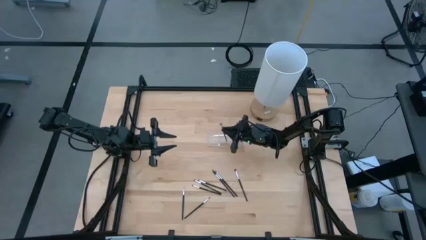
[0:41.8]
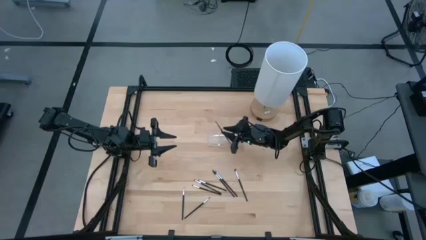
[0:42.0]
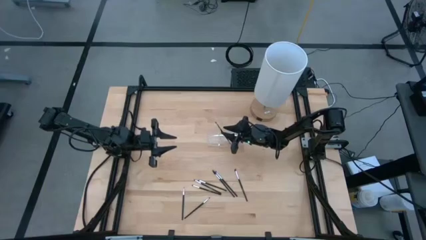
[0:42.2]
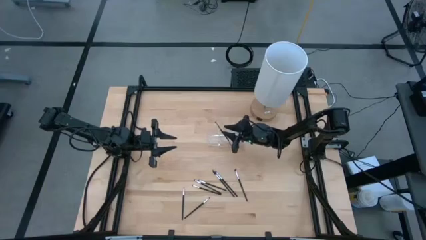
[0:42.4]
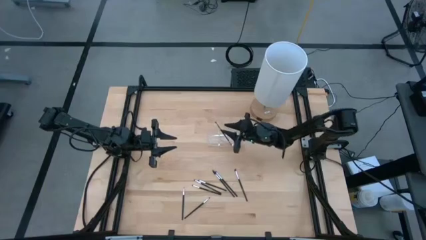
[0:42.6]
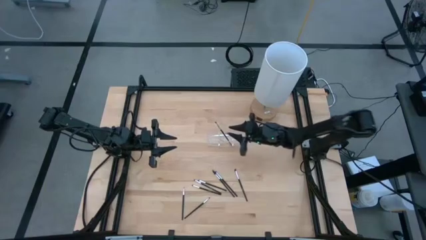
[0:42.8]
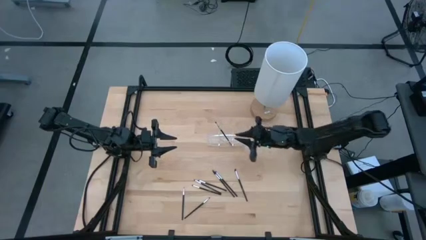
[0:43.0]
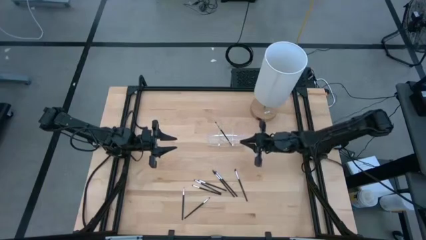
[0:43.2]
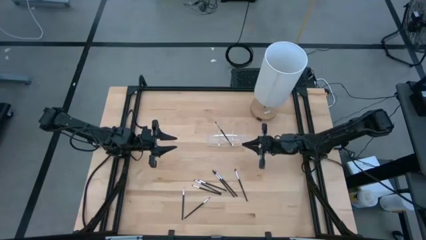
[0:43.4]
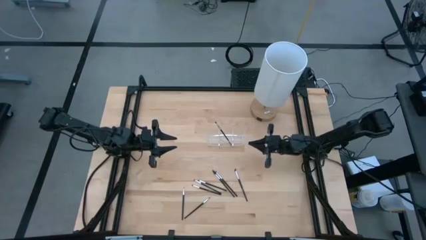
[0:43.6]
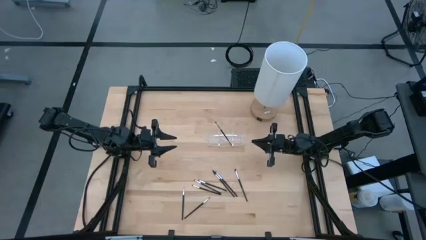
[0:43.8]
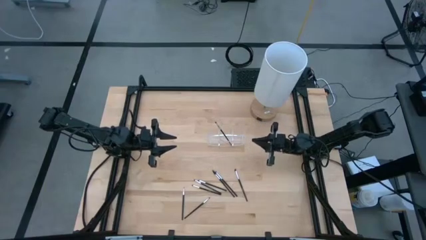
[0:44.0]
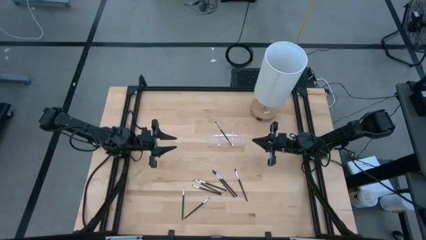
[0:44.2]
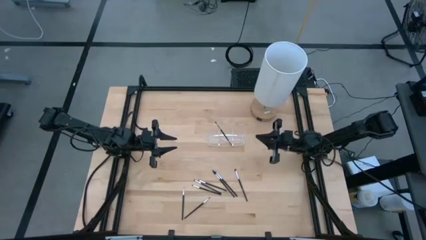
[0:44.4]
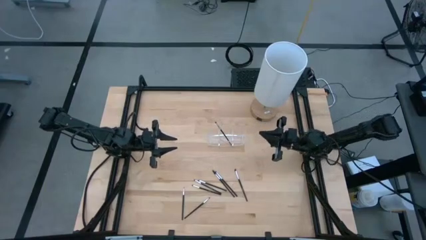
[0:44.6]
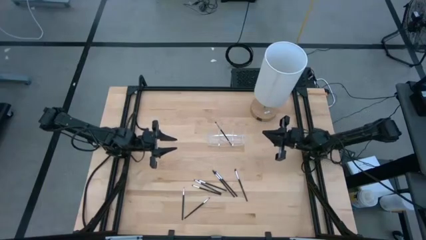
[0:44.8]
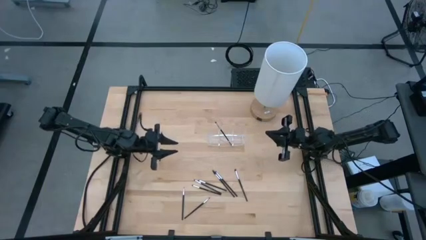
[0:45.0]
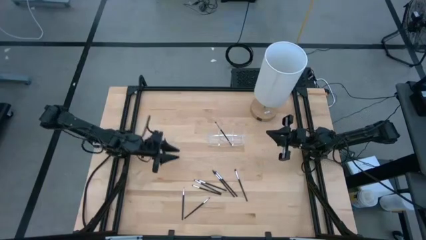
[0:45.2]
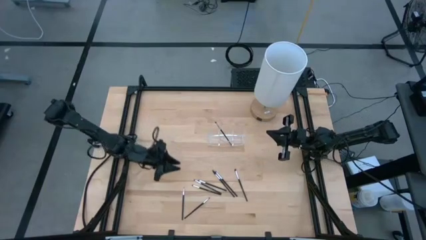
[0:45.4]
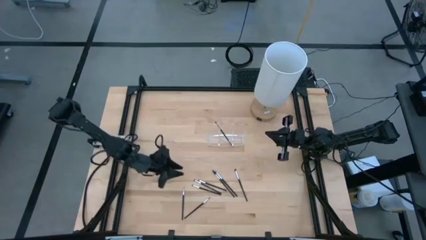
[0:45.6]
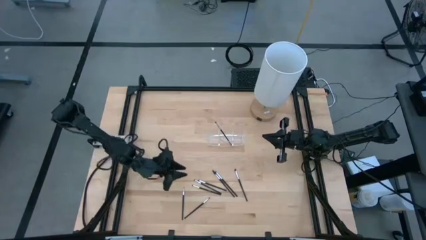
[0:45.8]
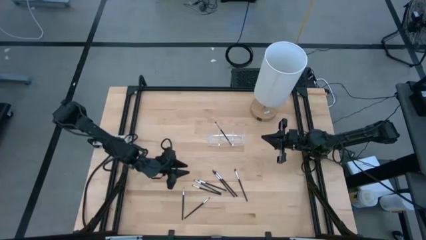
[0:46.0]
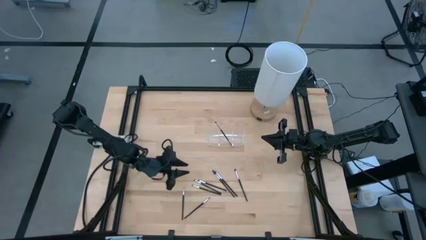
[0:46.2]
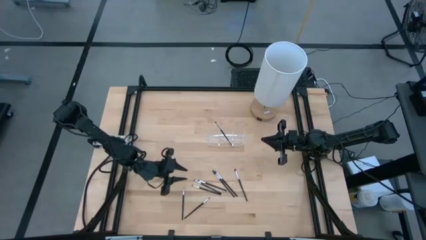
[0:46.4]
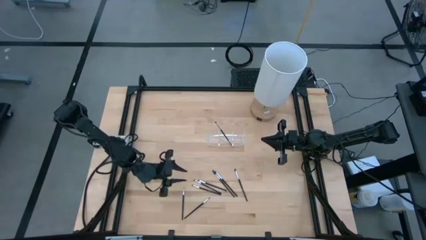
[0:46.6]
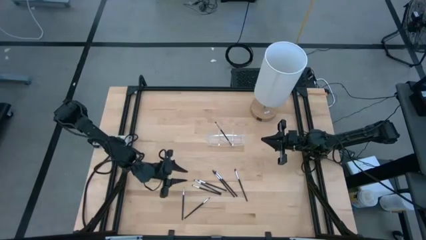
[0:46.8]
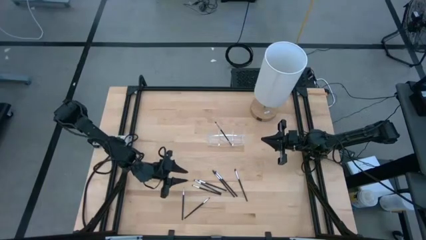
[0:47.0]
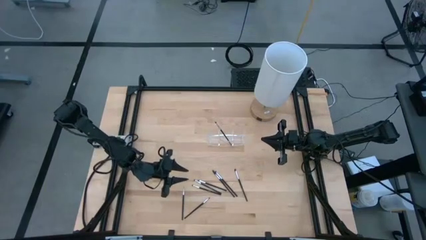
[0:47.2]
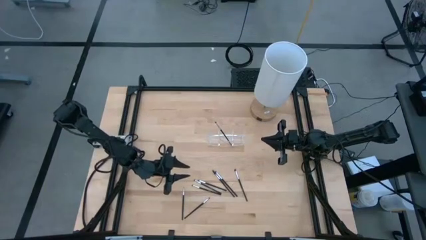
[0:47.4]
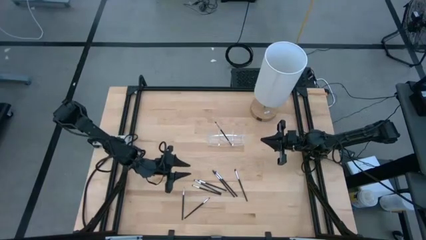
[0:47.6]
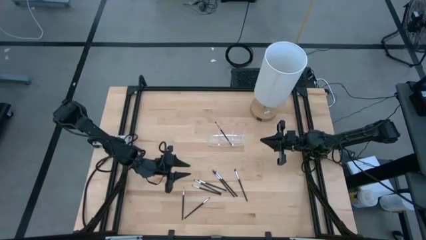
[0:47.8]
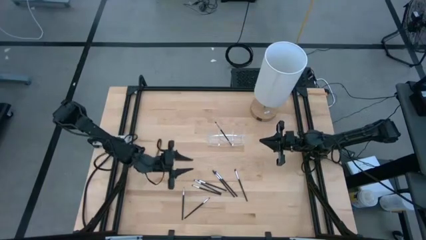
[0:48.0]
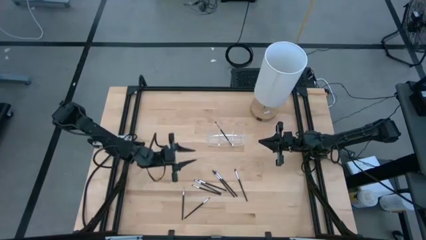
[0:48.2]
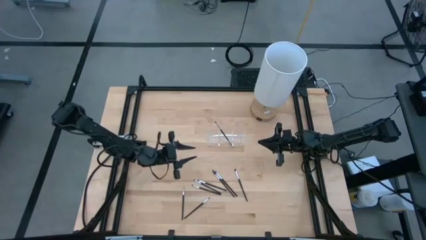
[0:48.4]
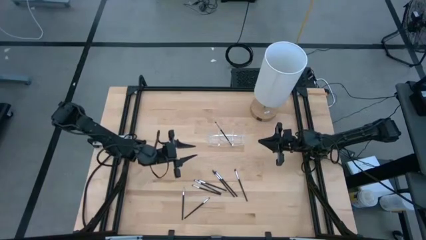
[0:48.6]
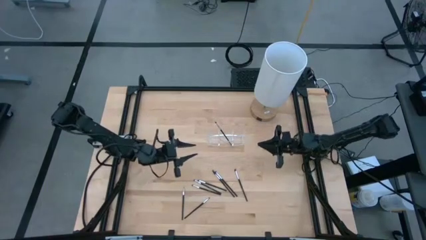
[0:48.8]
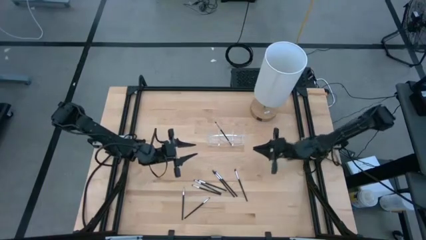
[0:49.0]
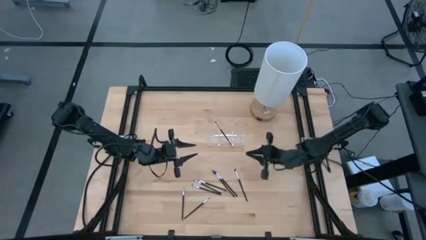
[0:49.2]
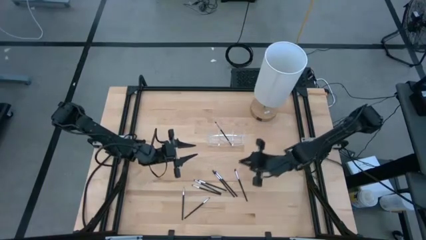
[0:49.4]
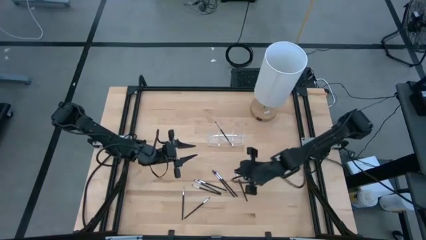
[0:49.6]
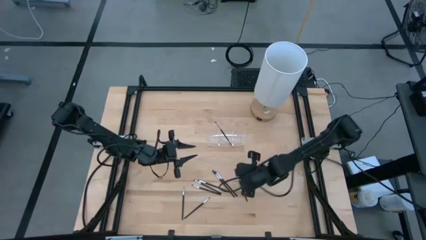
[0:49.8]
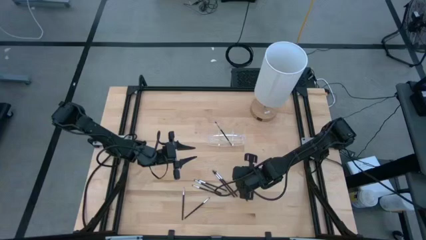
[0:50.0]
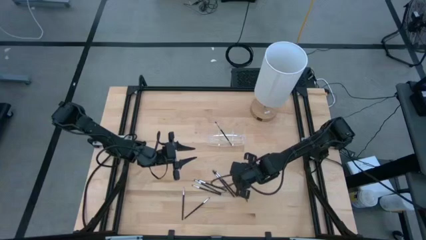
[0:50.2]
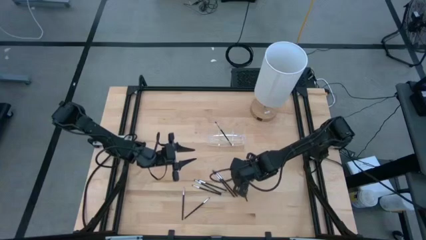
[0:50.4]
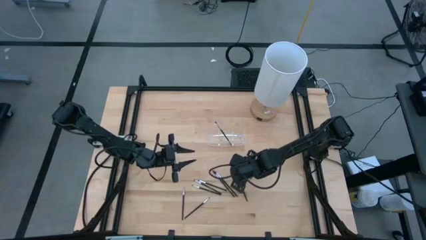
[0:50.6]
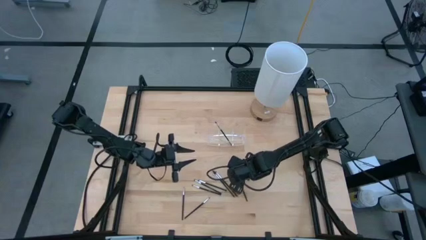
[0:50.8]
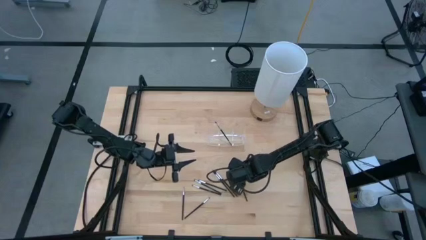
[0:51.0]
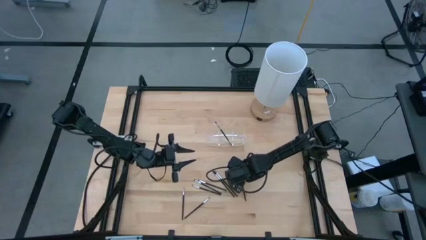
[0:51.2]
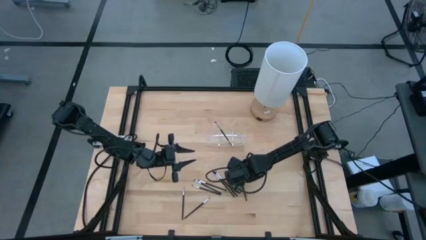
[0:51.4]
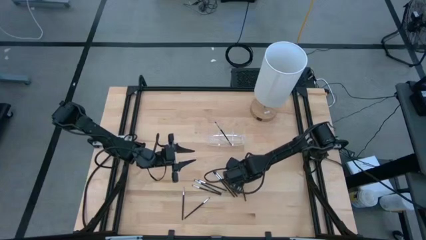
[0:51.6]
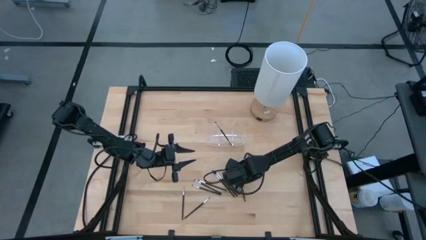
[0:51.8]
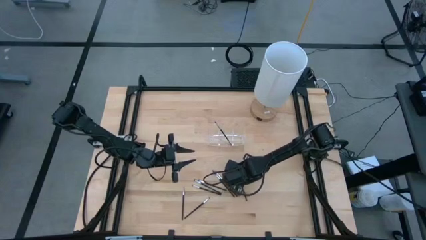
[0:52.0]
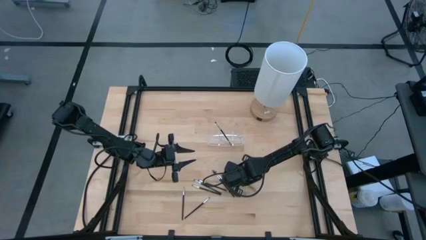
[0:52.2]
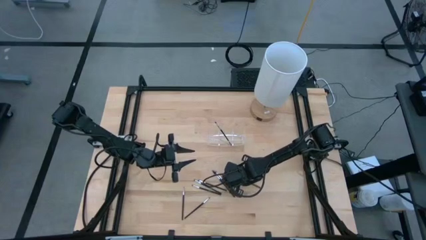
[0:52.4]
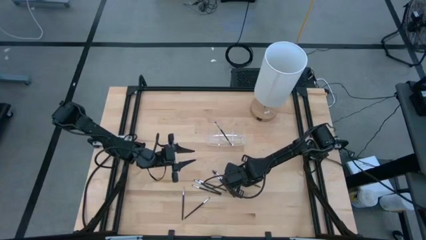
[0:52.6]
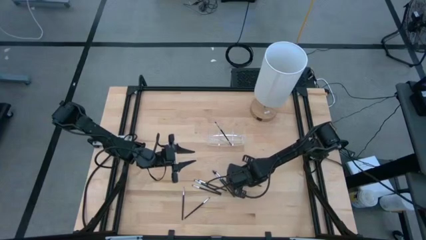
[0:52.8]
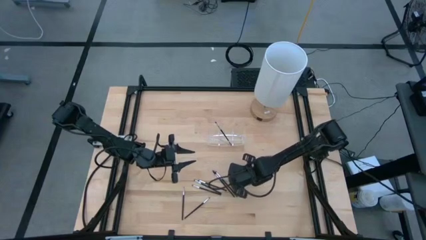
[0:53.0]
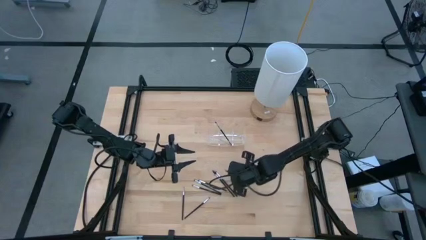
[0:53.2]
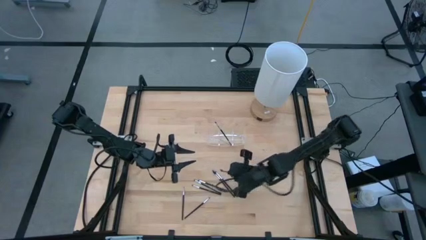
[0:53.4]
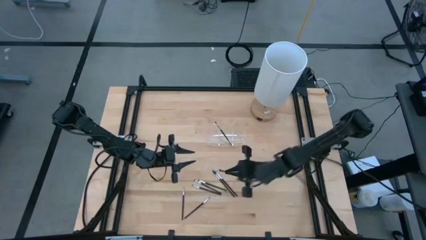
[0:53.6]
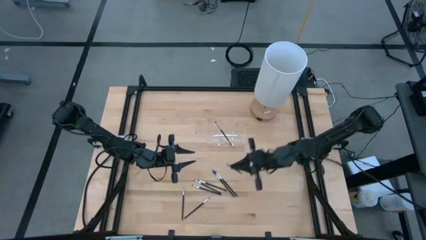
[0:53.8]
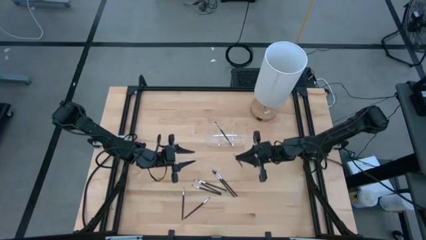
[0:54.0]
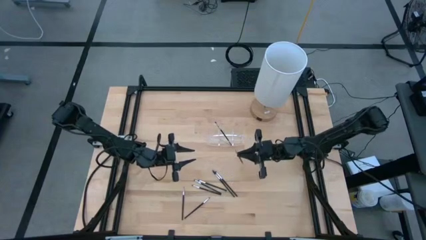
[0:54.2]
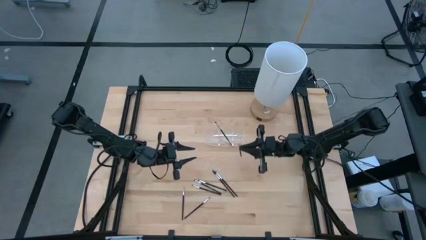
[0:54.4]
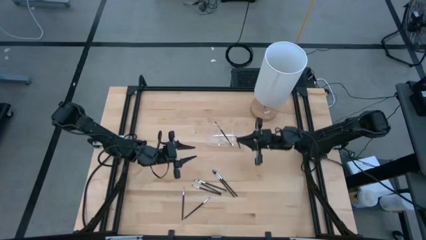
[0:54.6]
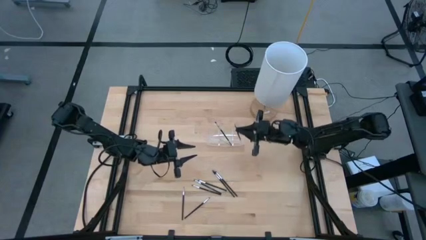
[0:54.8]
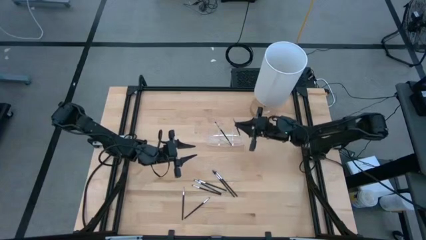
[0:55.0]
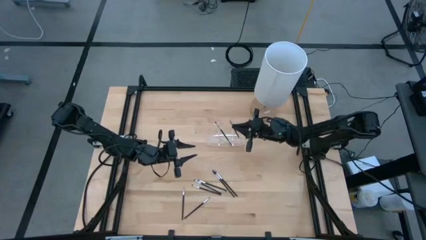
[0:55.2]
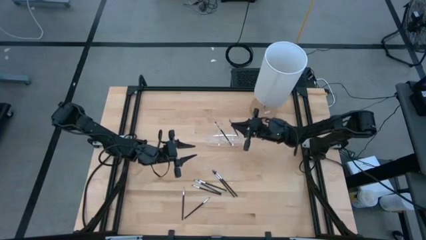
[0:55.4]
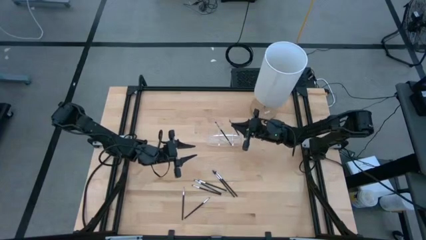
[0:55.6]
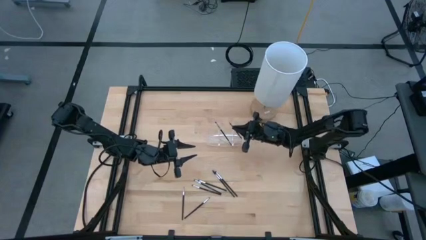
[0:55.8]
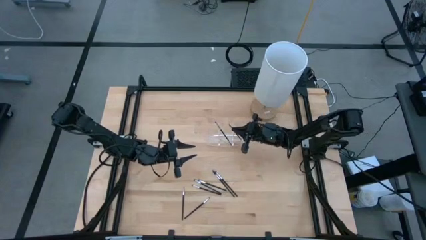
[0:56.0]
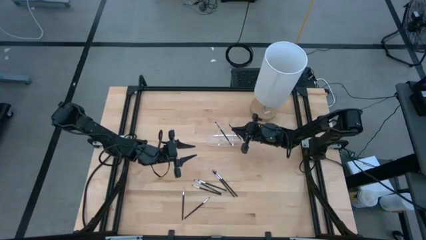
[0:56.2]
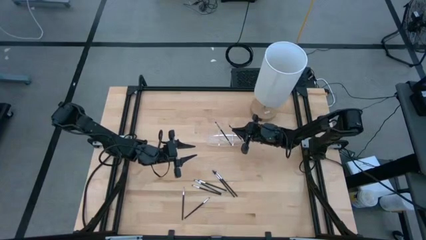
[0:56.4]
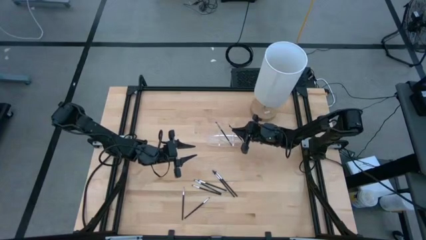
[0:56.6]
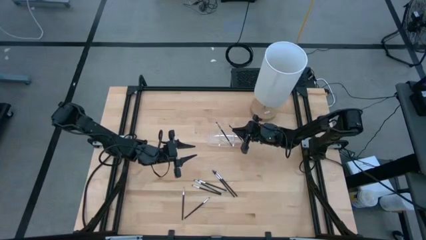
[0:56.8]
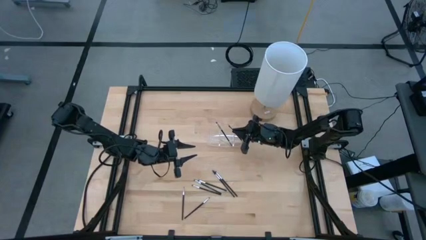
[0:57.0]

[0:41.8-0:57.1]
Task: Put items in baskets/containers
Put the black eyeshadow brush into the right section of the transparent organizer
